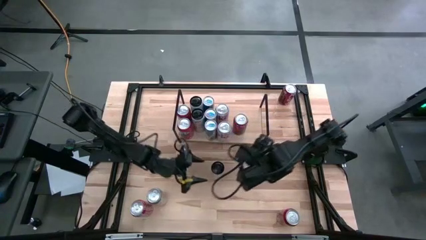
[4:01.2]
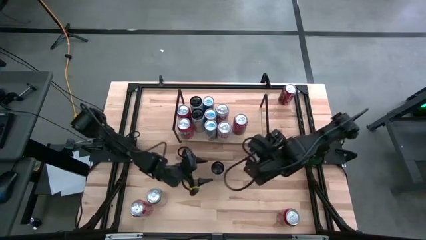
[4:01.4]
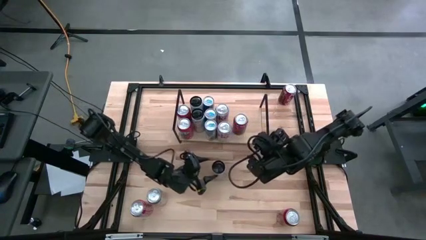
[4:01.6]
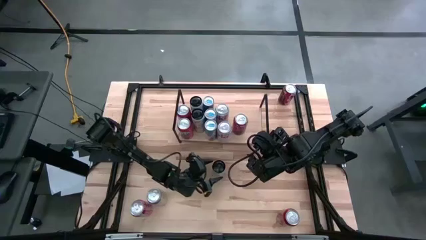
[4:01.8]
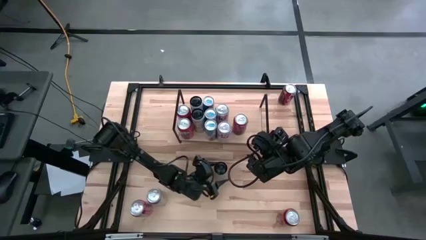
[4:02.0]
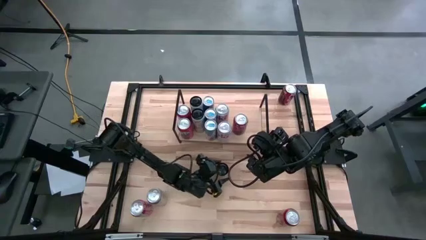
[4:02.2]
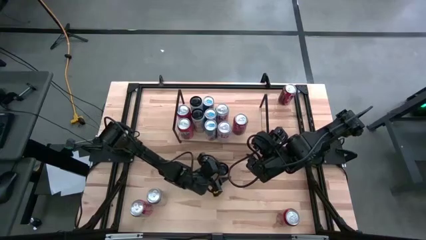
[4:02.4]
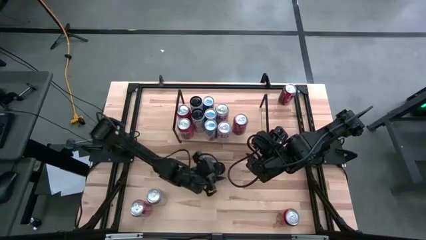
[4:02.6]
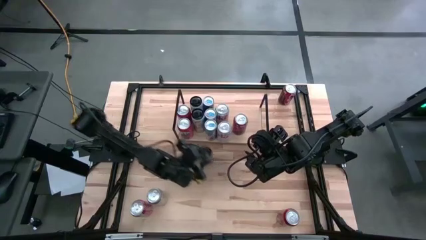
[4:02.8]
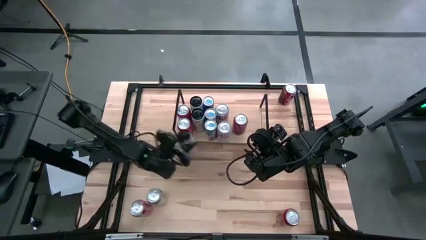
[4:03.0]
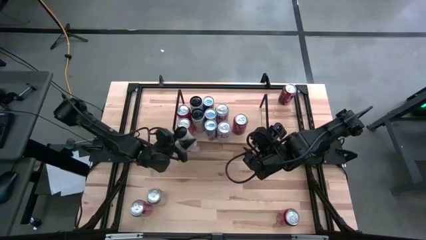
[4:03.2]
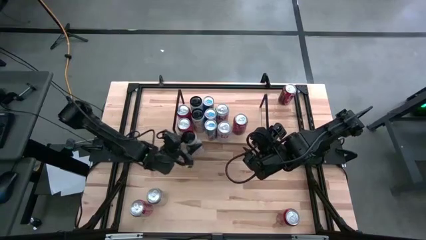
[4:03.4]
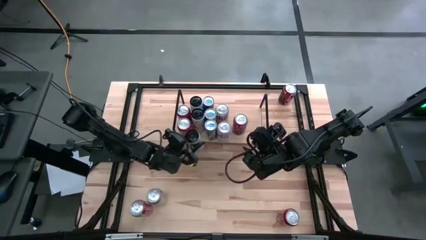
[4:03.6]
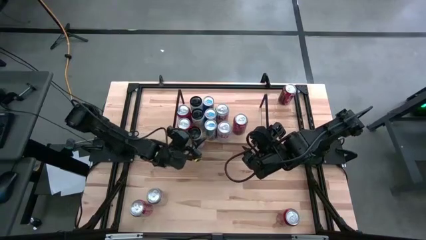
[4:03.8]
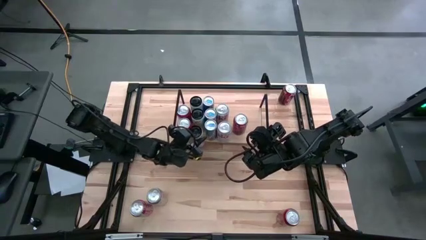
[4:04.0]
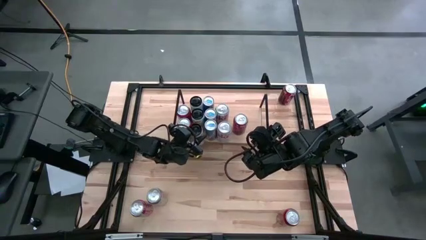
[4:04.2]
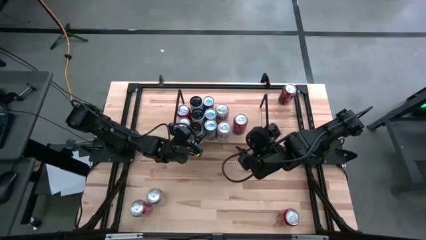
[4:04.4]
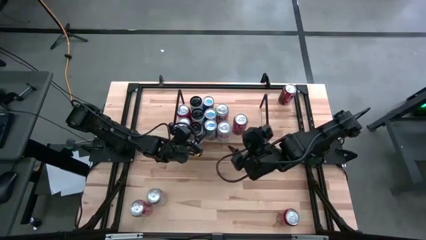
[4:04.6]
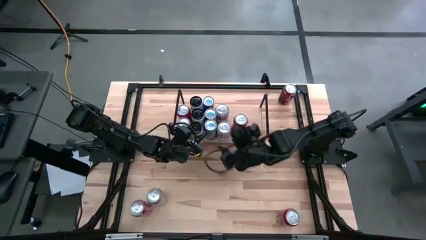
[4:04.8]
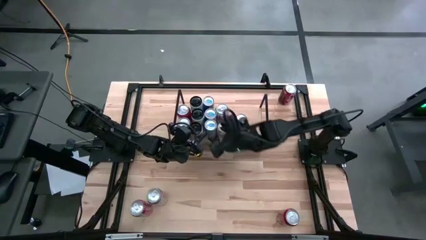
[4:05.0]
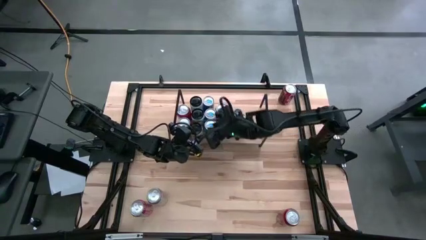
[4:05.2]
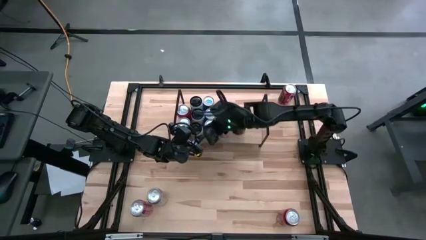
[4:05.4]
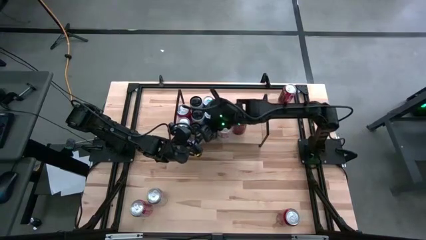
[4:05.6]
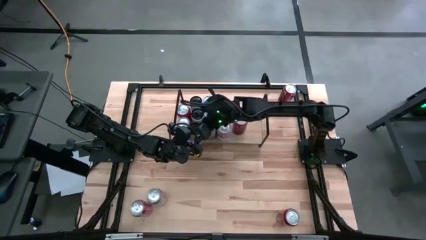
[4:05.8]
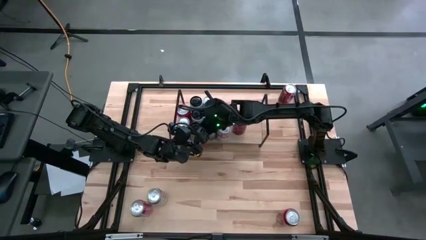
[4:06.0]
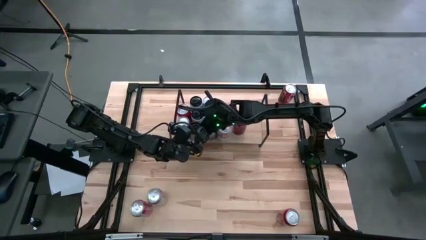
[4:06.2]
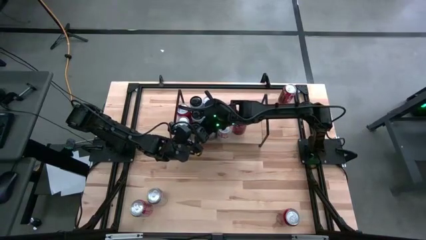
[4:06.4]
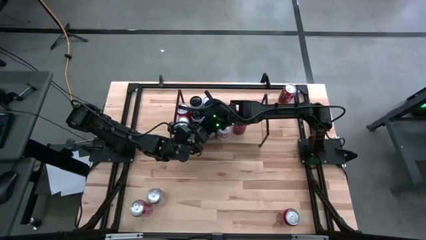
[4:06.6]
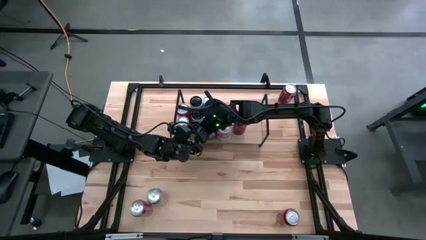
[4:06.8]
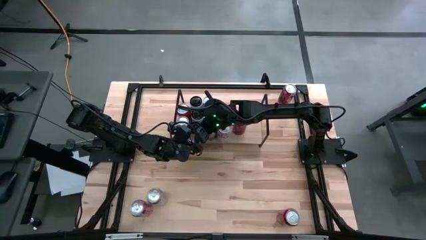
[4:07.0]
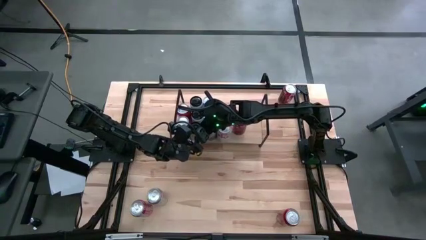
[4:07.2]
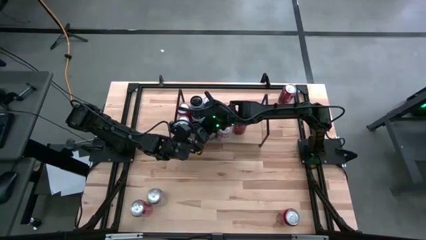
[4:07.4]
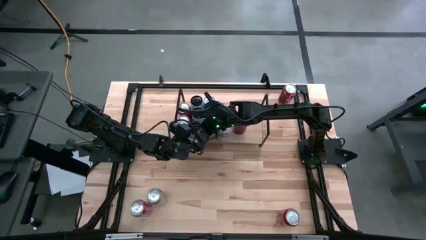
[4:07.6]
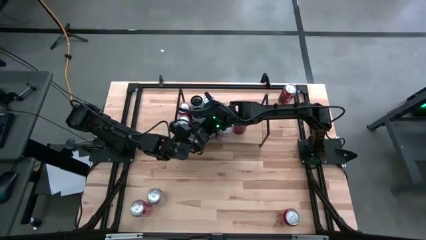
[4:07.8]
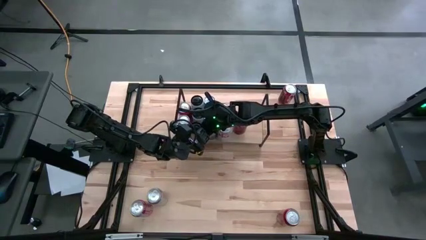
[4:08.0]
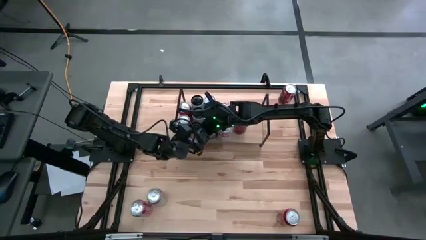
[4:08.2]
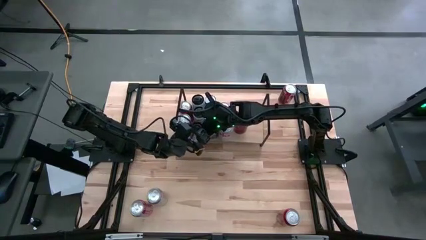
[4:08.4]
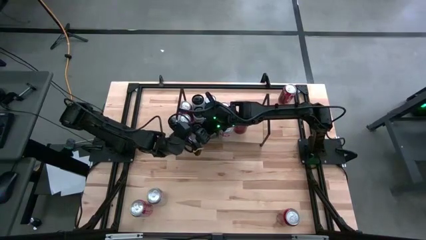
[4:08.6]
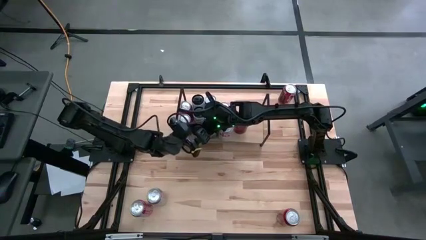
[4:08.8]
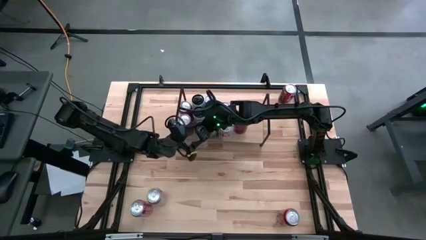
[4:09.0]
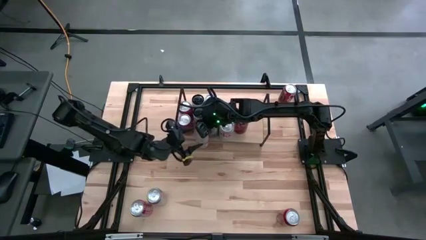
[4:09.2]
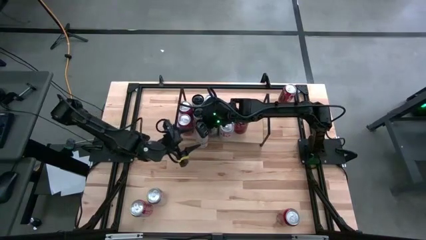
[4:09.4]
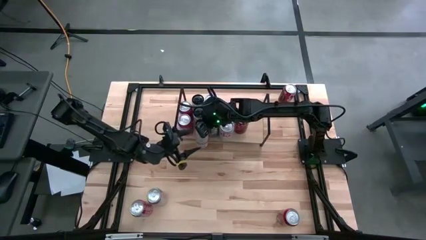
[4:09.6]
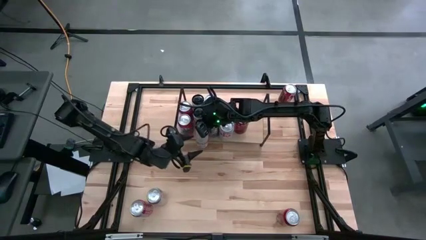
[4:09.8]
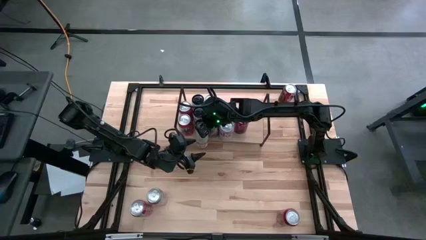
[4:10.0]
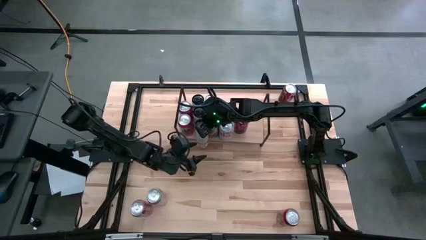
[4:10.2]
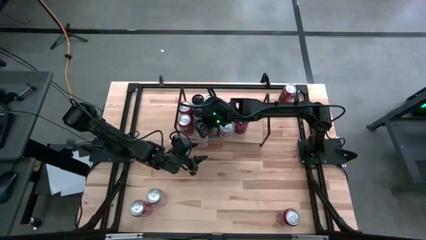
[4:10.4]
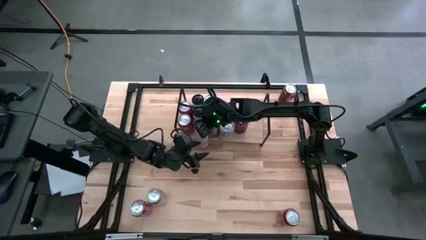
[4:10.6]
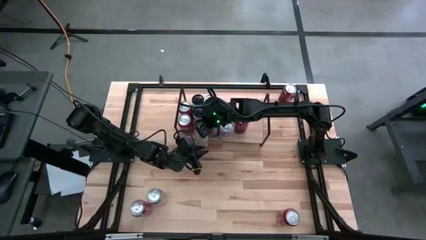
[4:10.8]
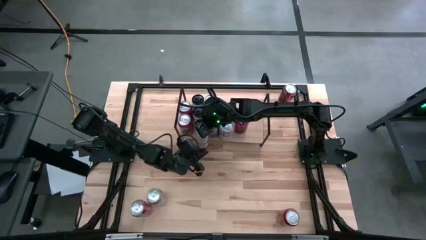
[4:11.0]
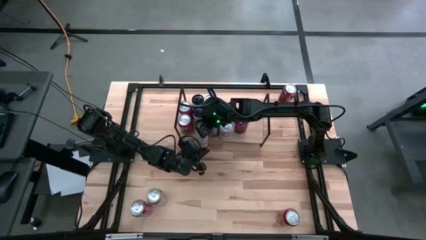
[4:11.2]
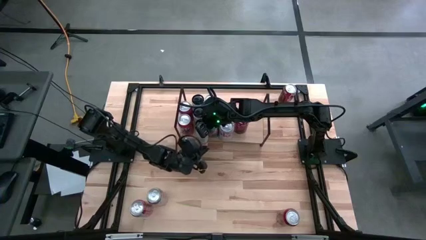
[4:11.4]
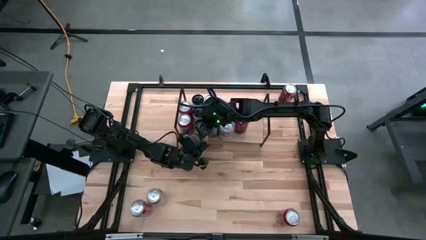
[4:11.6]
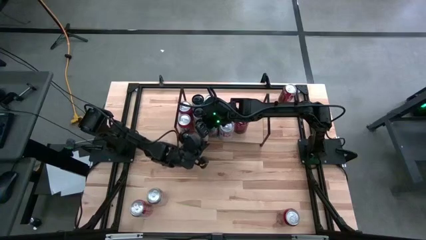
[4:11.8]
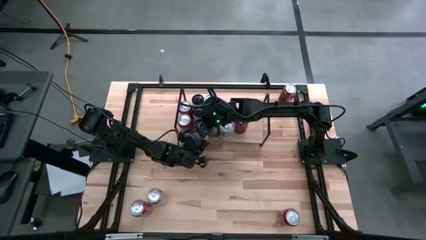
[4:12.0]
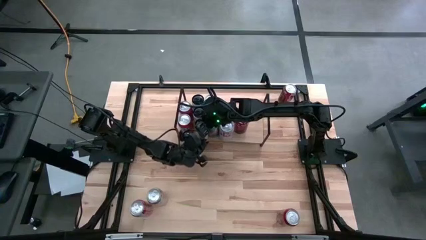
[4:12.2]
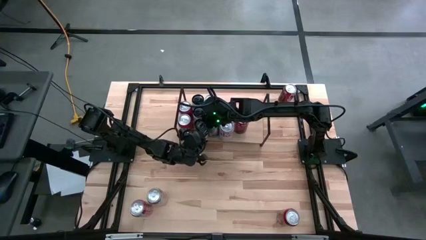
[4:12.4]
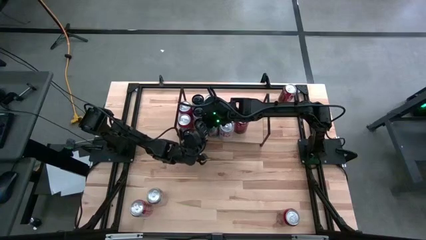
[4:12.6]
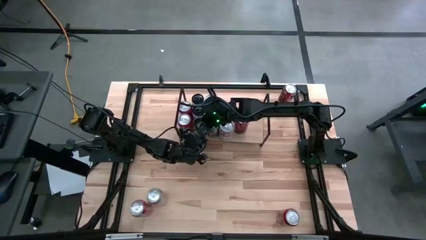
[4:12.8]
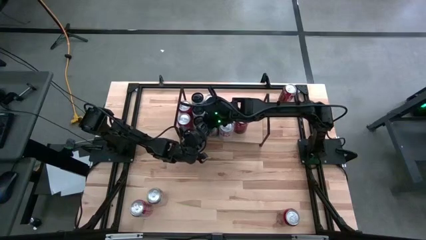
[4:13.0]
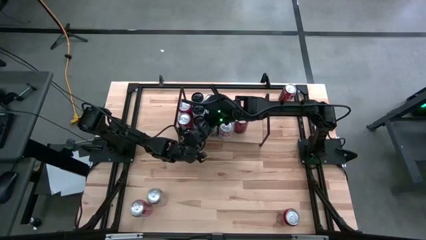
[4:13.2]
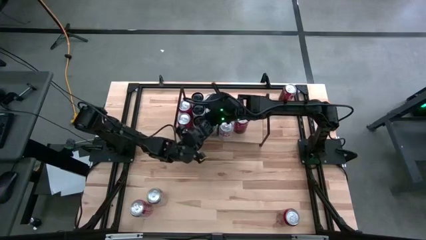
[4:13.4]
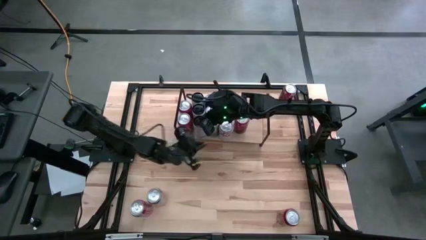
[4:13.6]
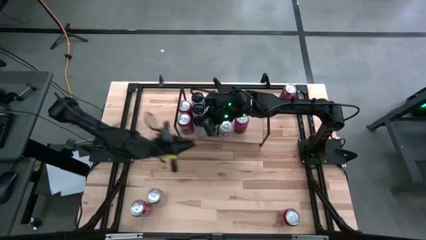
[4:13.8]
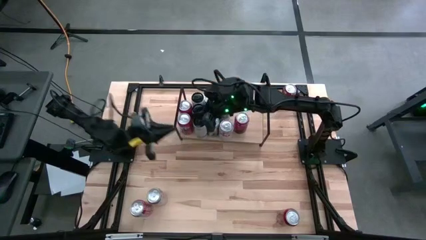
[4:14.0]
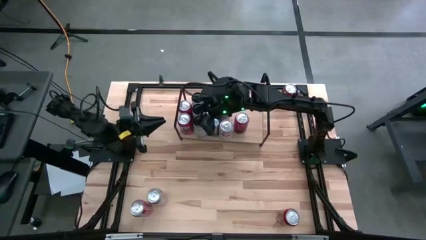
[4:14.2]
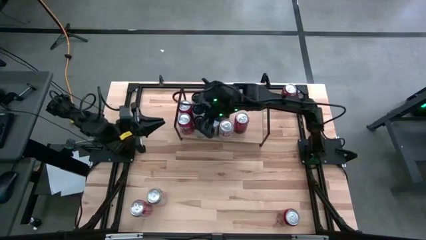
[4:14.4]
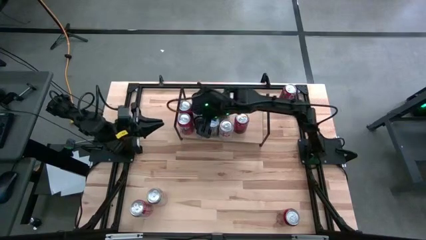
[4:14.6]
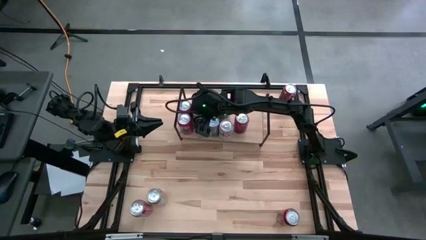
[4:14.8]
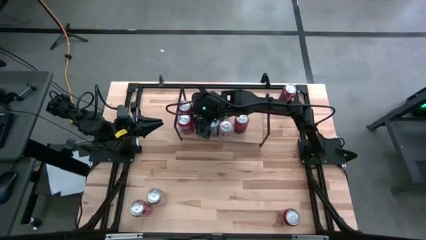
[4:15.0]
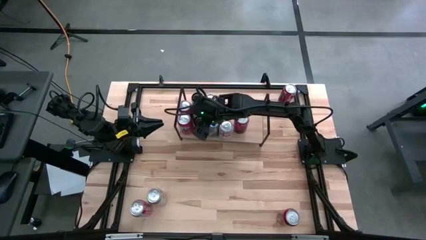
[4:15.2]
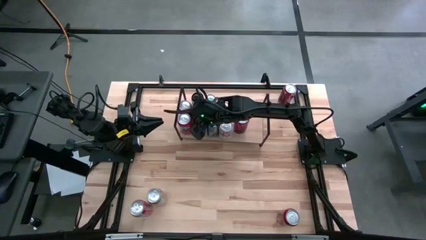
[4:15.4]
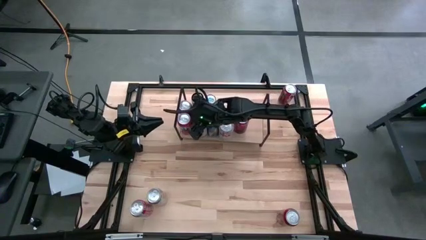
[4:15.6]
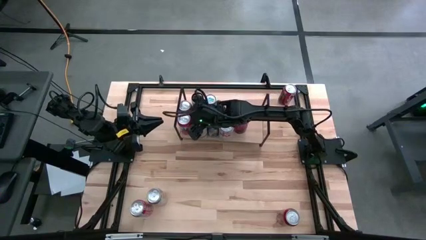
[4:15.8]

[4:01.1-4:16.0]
Task: Place canned beverage on shelf
Put the white-pink soda can on the shelf aligned with the other white-pink soda cans

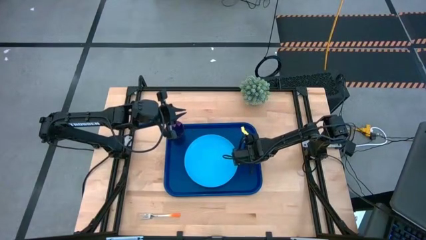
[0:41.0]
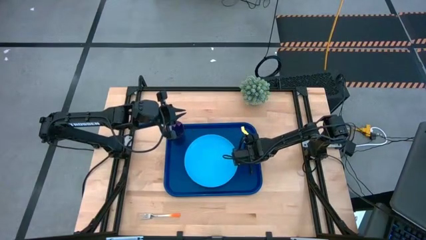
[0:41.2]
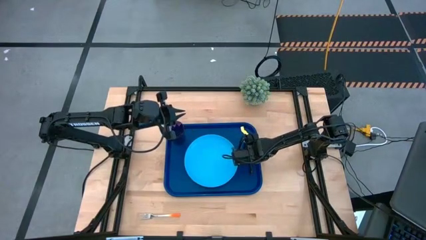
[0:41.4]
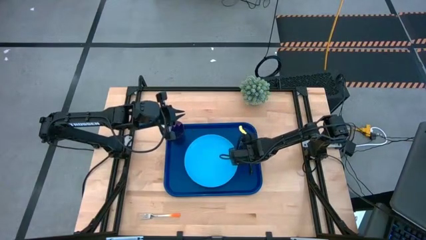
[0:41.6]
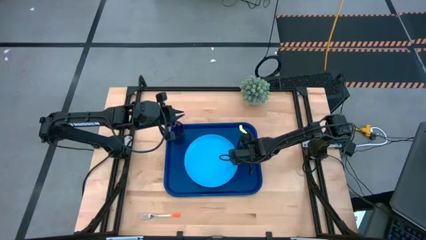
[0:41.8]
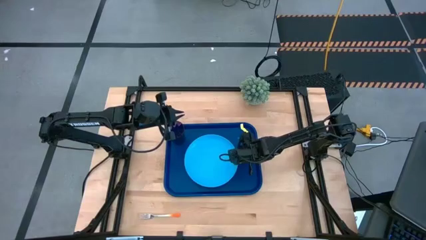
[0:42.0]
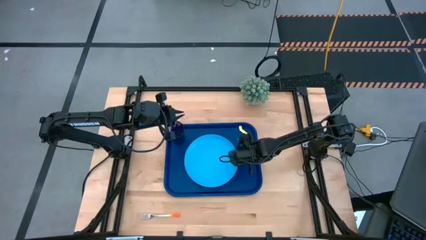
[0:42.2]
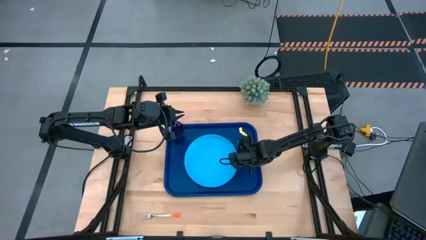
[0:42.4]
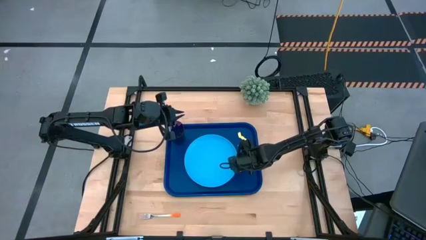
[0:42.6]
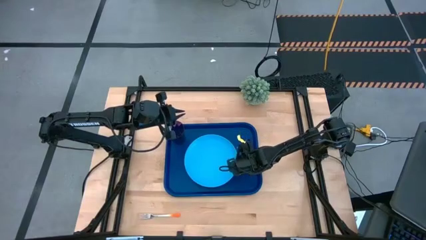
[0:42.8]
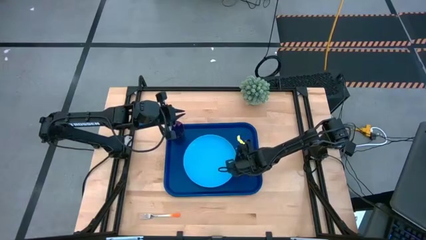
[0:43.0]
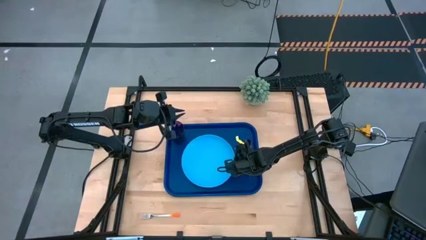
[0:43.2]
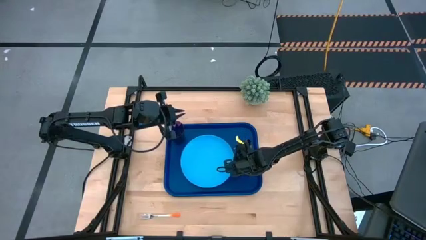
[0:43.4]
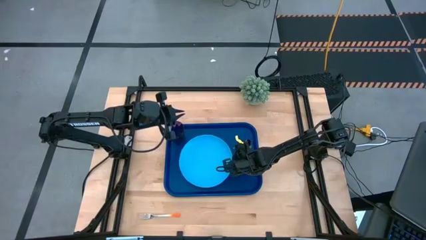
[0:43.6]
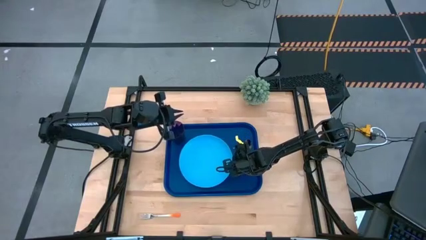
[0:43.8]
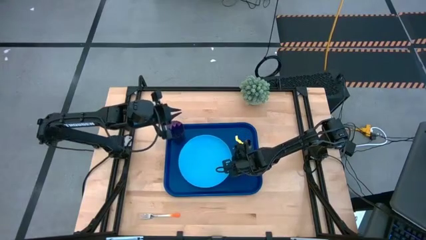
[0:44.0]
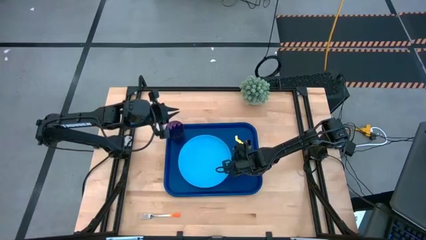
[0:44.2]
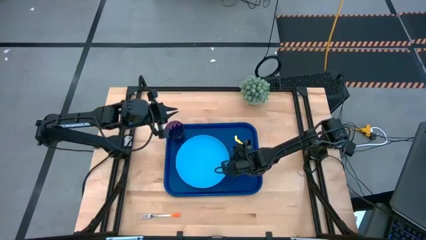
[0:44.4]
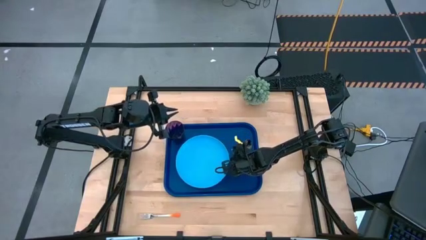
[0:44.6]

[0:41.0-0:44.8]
Task: Pick and place plate/cup/fork/spoon on tray
Adjust the light blue plate on the dark blue tray
